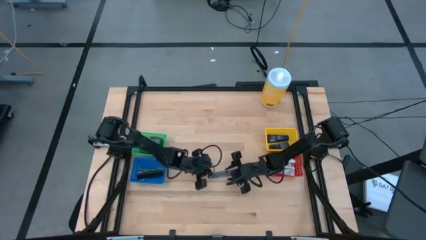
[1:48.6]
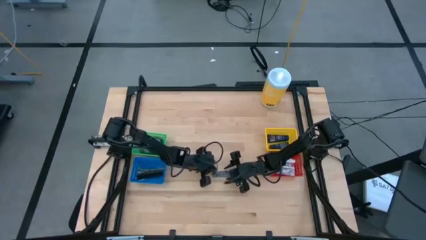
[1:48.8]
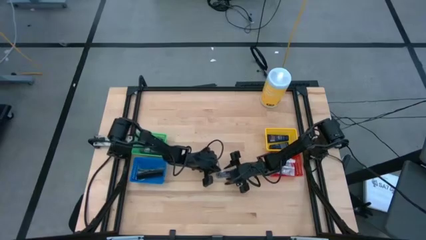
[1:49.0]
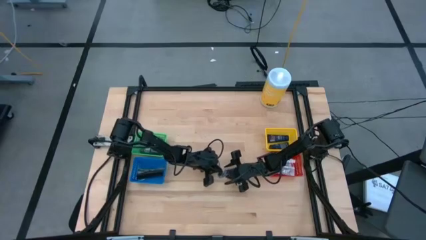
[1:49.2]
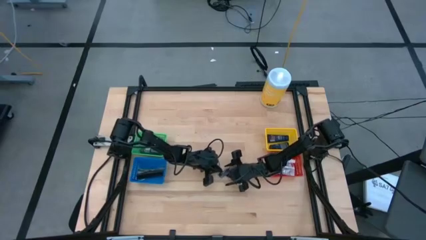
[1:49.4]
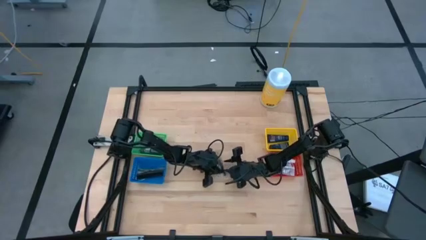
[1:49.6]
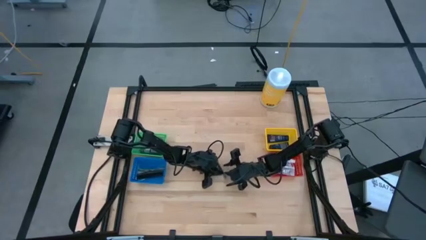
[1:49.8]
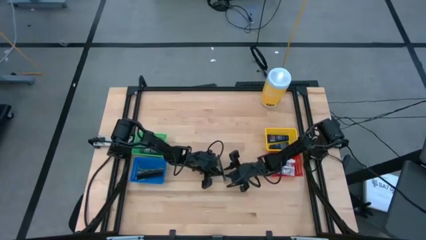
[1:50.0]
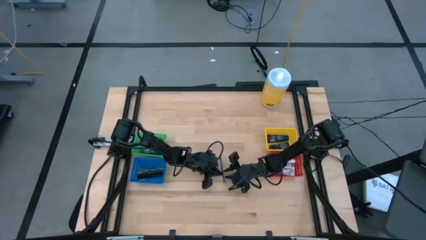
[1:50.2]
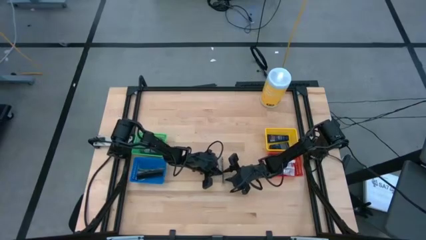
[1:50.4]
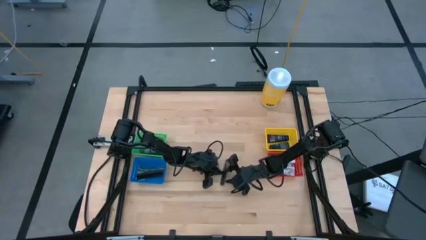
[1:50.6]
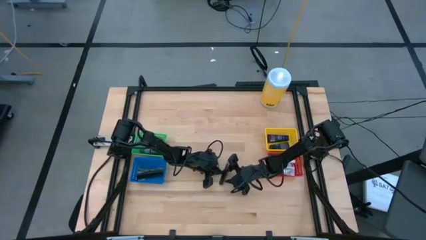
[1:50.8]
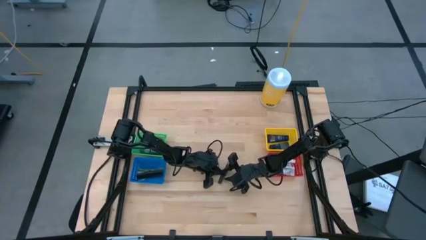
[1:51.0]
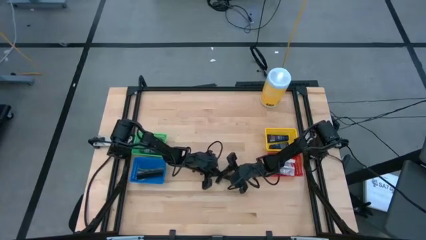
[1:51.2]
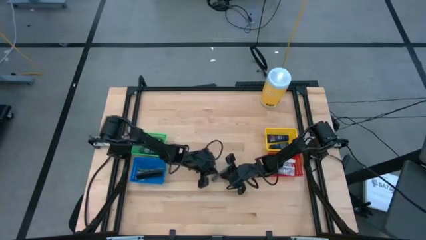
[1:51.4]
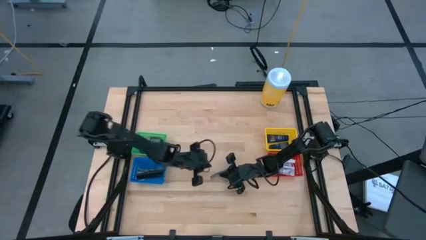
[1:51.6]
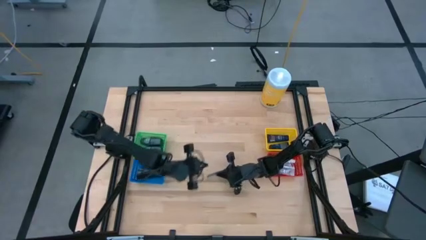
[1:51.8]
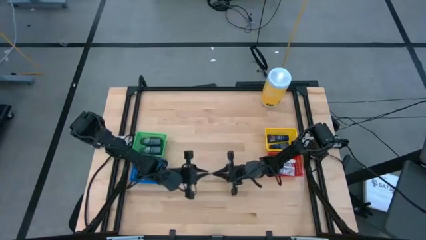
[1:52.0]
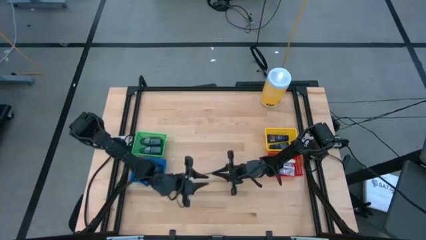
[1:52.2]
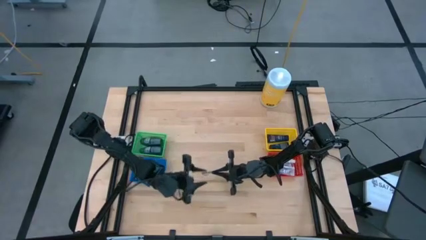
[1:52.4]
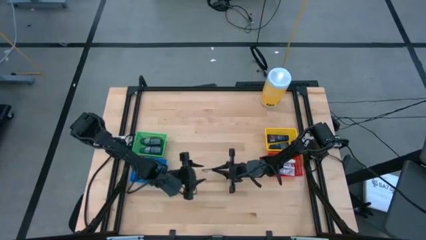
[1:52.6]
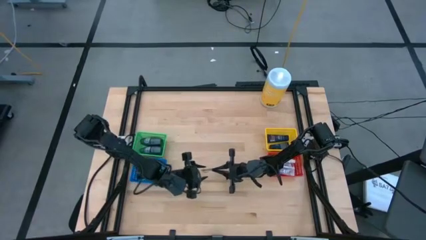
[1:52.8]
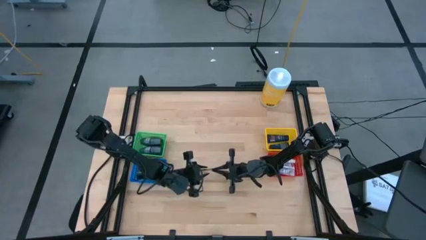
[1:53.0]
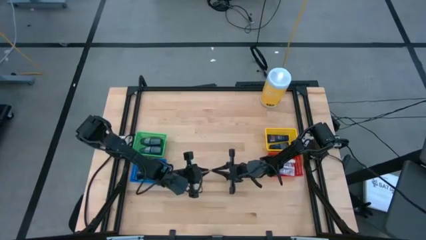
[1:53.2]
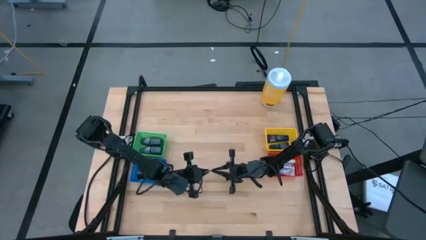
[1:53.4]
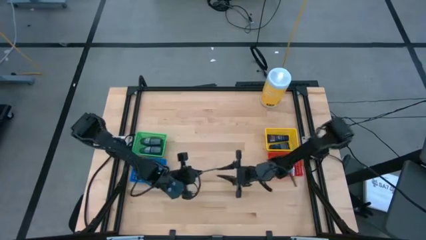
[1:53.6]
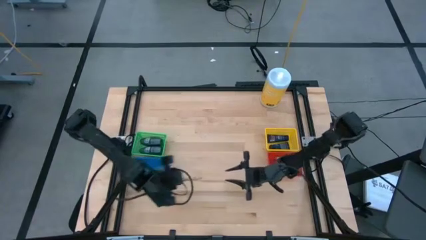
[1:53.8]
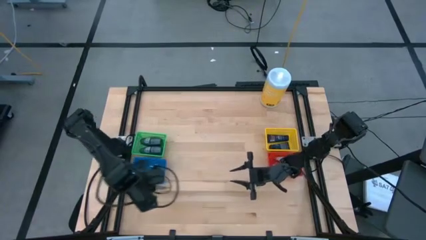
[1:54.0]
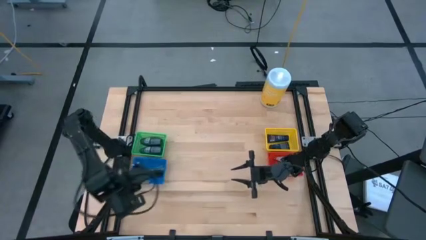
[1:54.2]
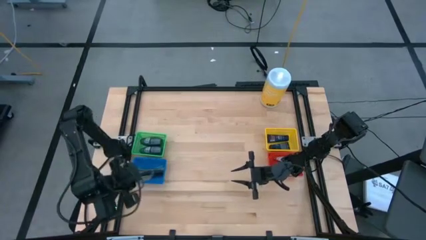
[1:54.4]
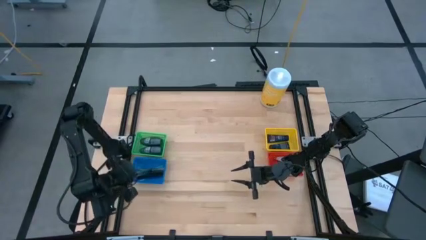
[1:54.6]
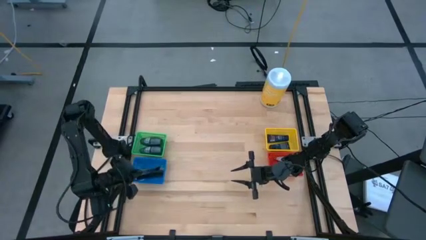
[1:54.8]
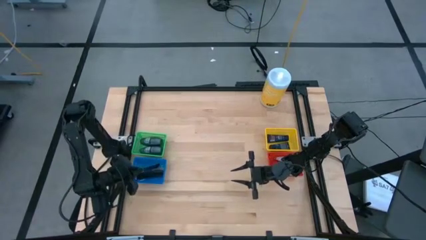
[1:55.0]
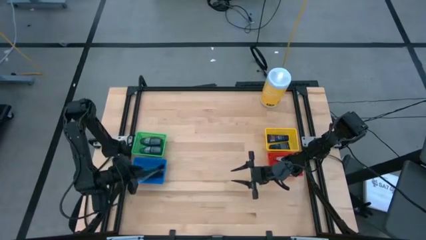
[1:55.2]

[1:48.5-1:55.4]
Task: Pick & Place Travel size toiletries
Put the black comb into the blue bin

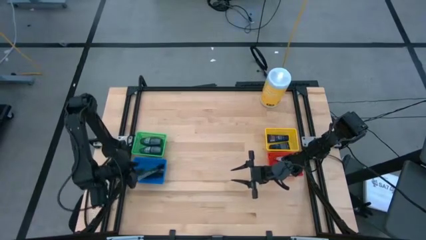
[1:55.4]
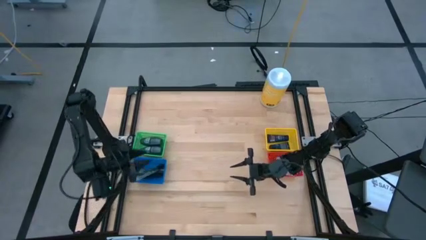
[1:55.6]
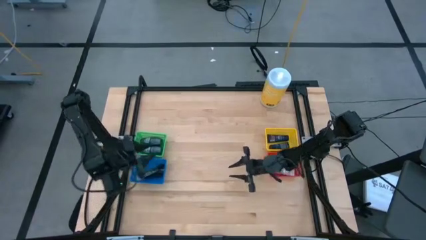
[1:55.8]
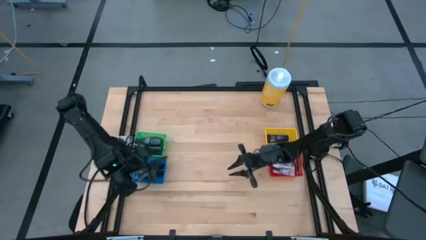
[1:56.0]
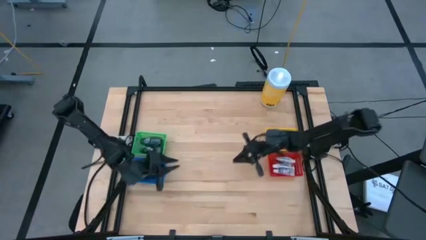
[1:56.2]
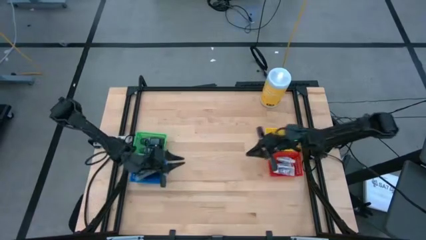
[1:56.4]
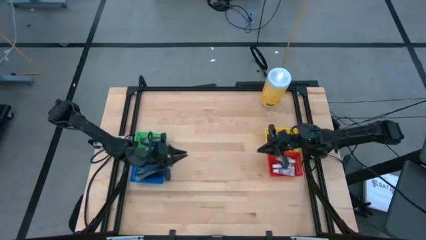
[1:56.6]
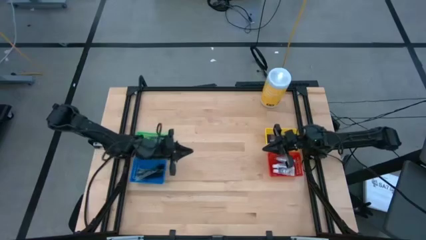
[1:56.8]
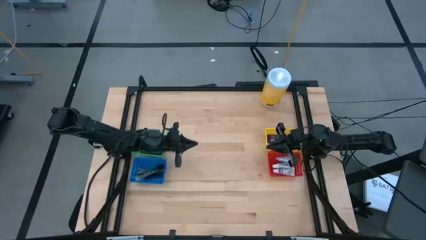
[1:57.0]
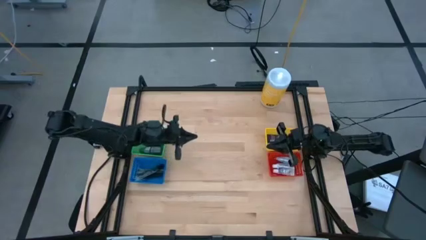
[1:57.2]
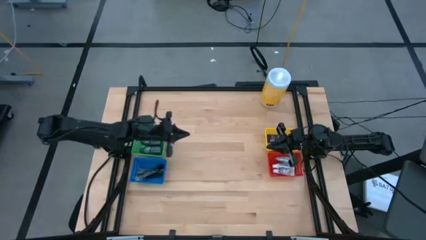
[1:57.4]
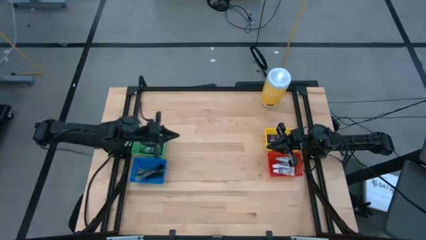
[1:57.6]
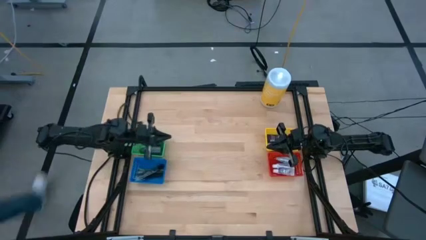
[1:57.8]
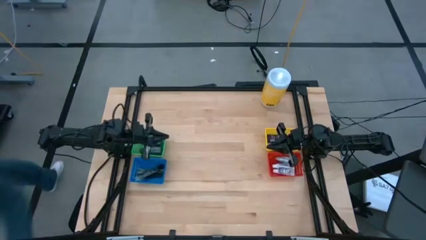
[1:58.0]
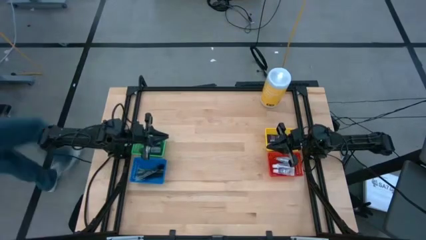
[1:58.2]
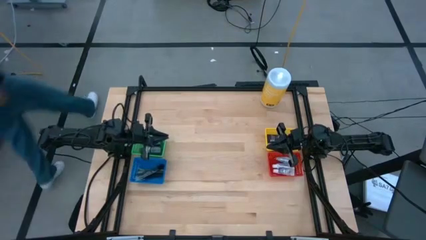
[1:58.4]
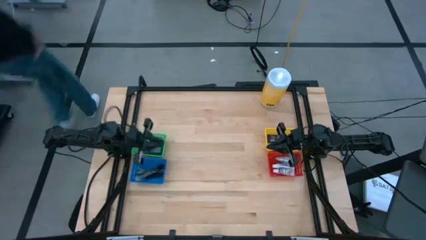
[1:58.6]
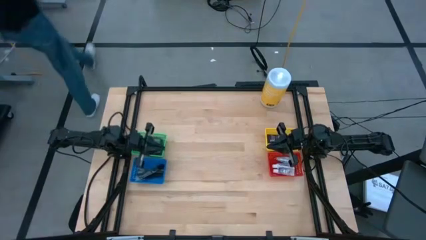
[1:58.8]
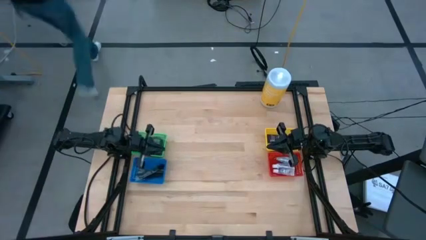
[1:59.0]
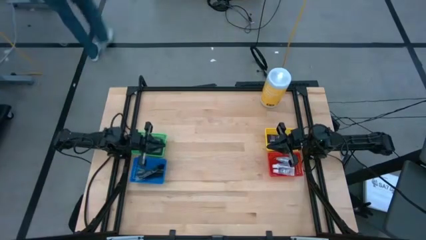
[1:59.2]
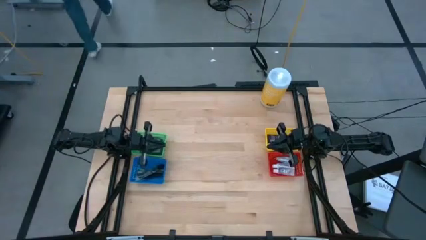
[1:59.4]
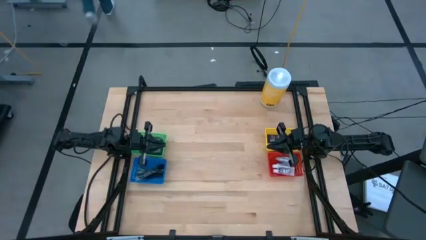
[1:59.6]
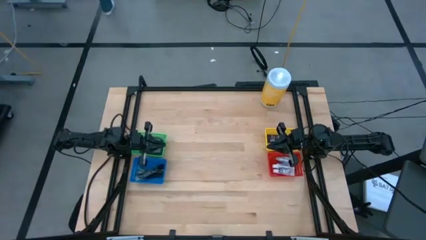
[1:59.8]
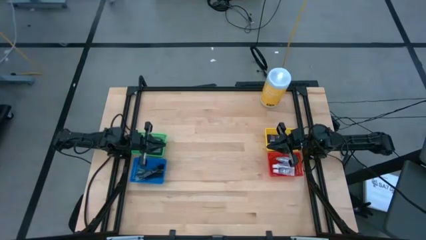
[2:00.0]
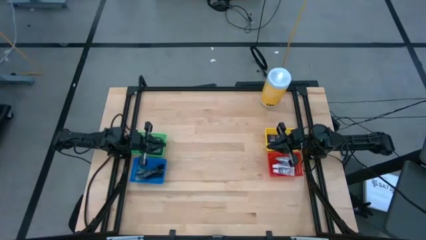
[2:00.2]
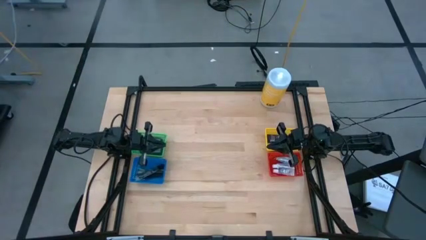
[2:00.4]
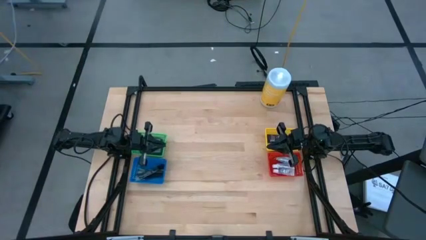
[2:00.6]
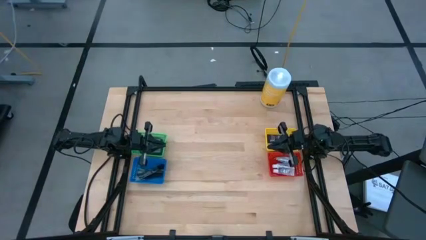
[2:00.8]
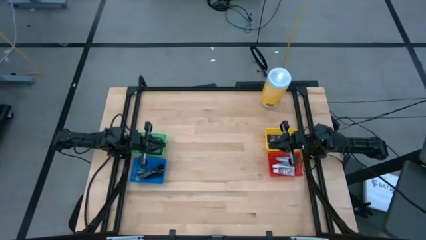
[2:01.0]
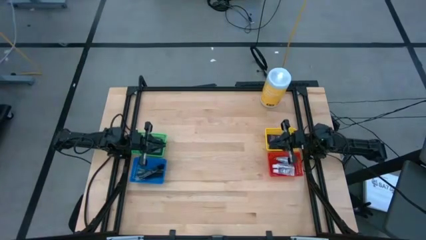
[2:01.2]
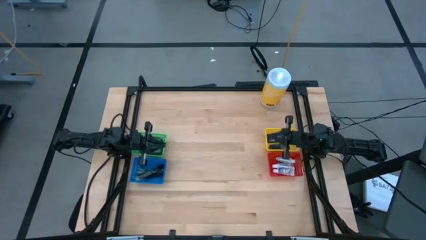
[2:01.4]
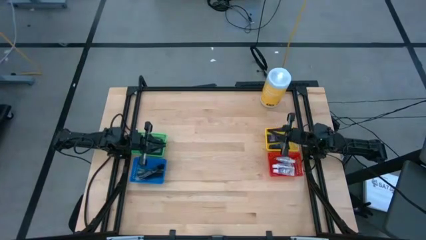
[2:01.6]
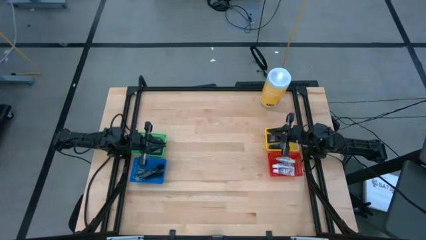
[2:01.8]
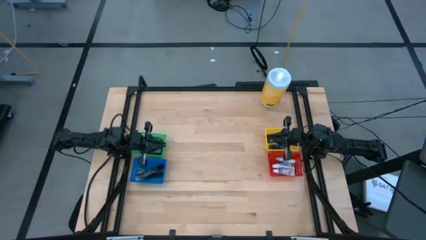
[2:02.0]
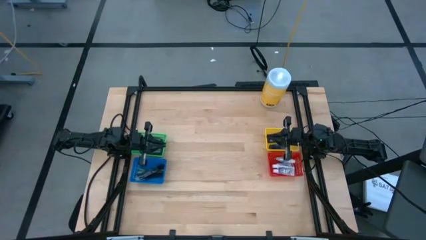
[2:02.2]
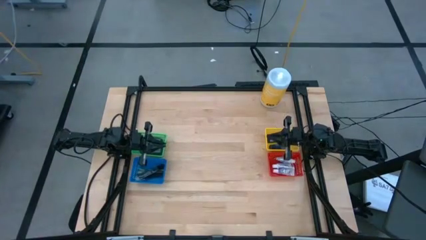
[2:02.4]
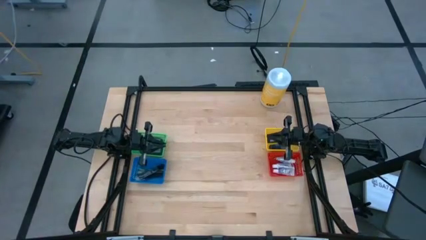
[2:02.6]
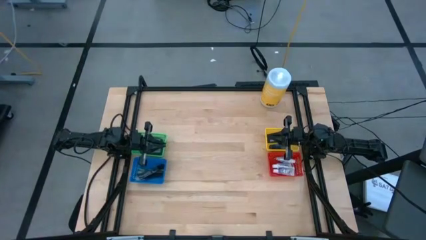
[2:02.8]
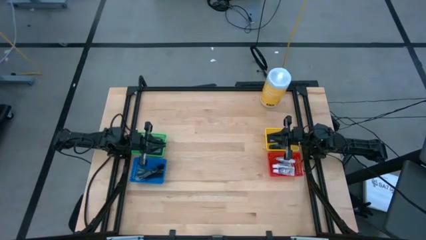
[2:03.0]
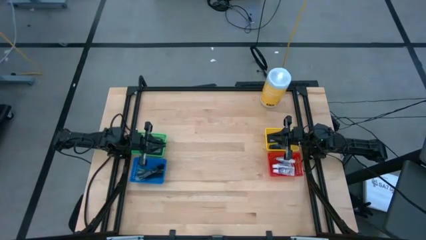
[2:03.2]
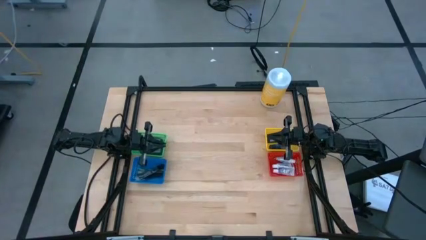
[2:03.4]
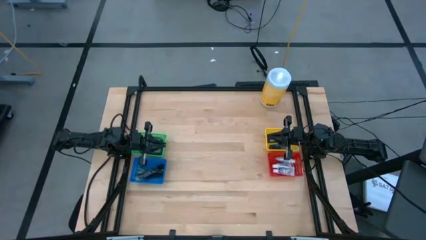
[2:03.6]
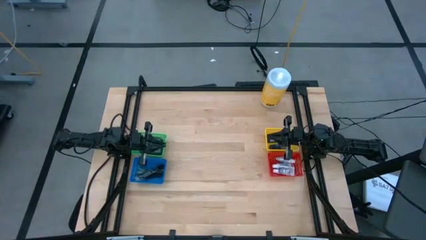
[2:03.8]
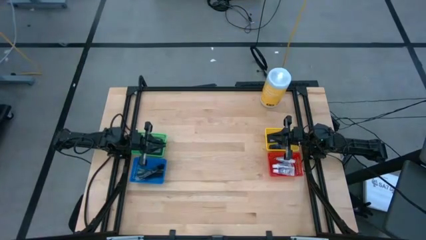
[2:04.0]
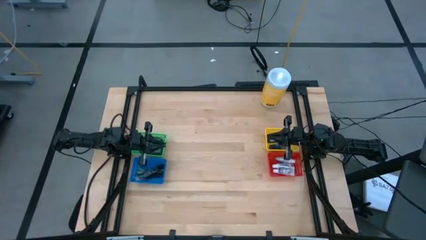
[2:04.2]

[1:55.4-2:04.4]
Return to Home Position
